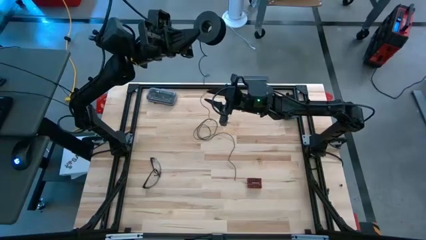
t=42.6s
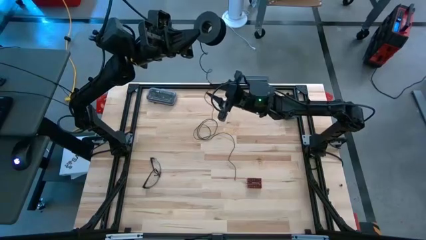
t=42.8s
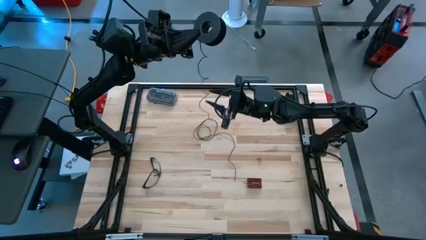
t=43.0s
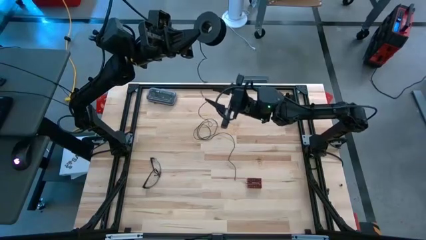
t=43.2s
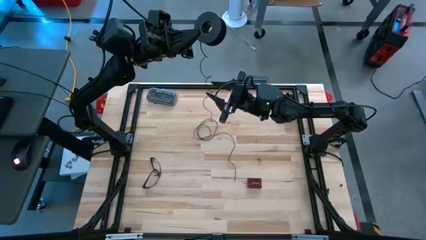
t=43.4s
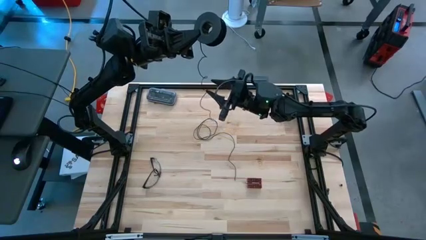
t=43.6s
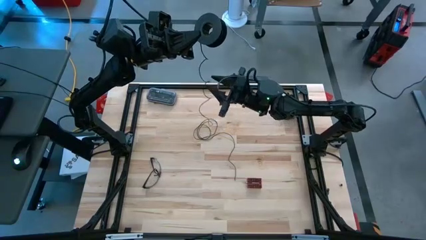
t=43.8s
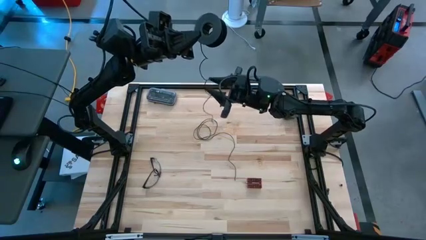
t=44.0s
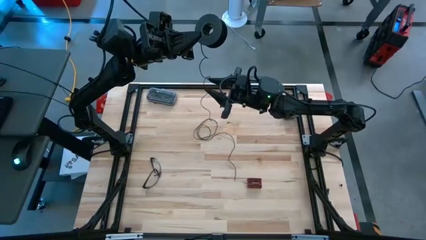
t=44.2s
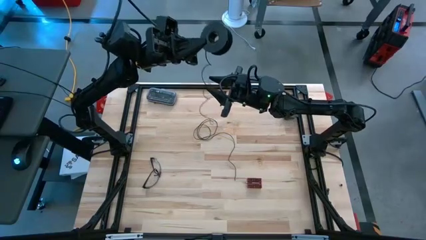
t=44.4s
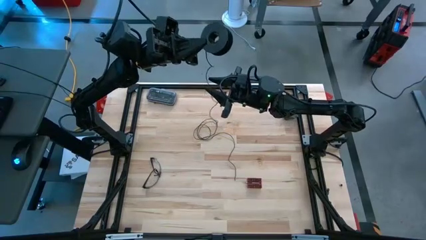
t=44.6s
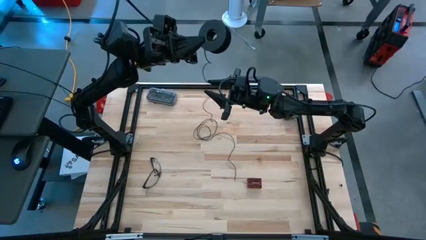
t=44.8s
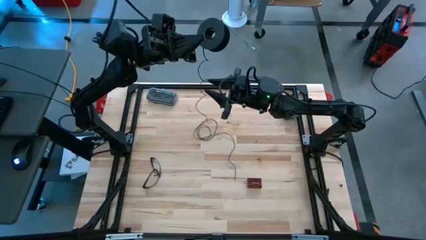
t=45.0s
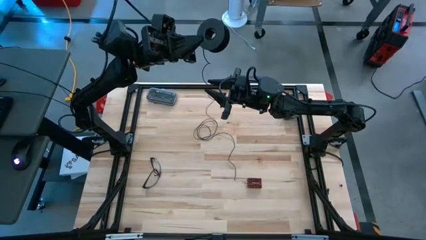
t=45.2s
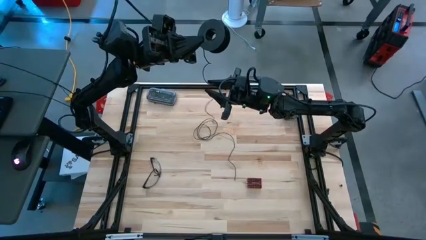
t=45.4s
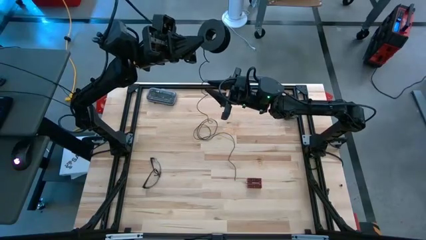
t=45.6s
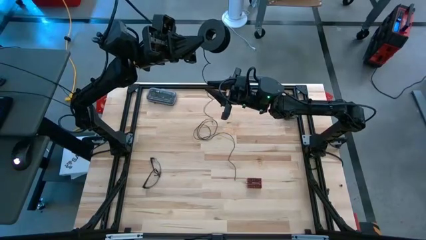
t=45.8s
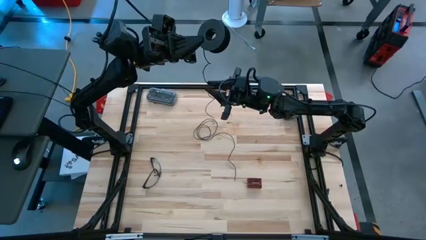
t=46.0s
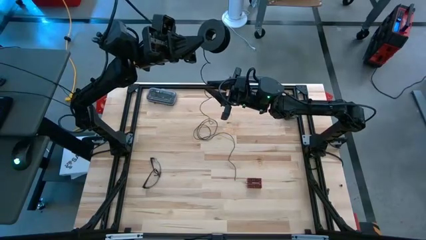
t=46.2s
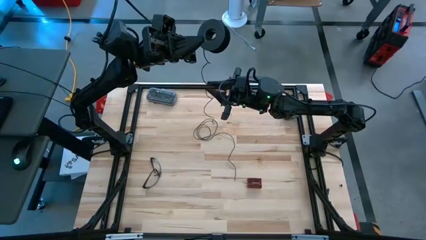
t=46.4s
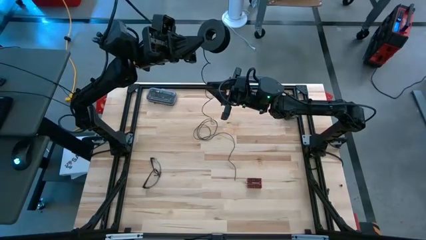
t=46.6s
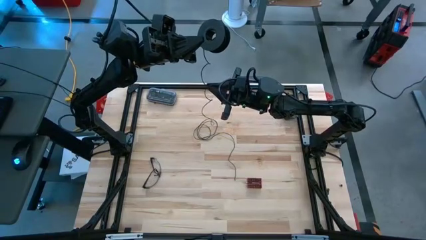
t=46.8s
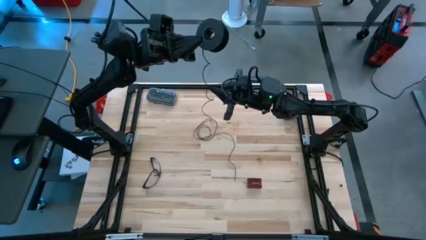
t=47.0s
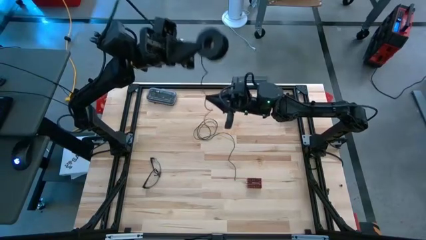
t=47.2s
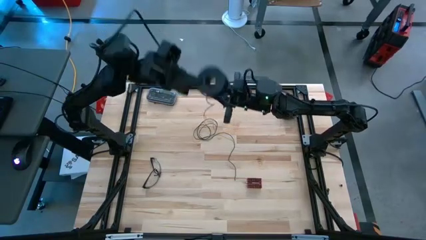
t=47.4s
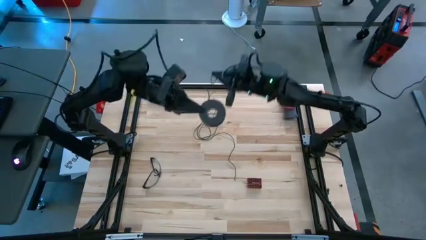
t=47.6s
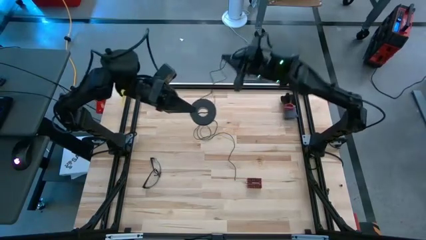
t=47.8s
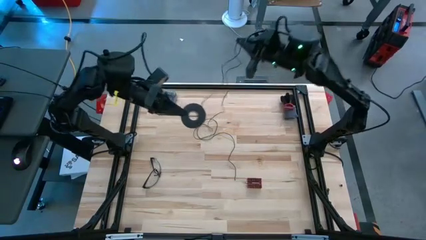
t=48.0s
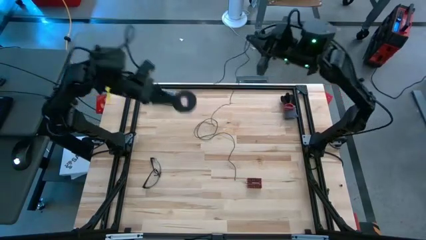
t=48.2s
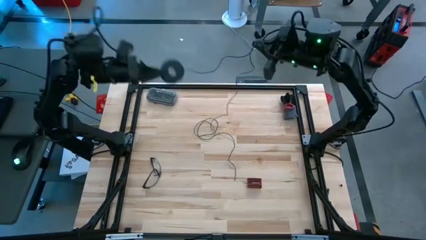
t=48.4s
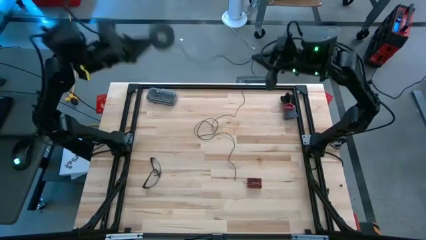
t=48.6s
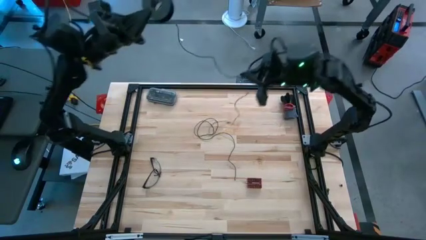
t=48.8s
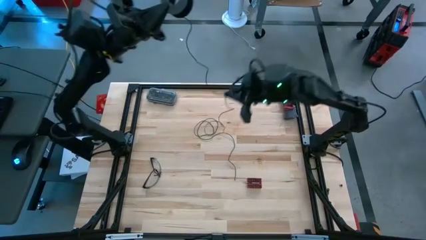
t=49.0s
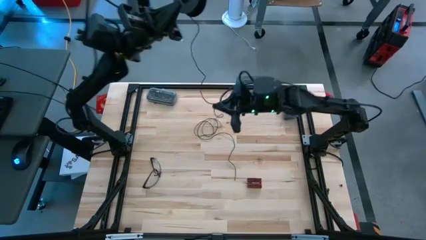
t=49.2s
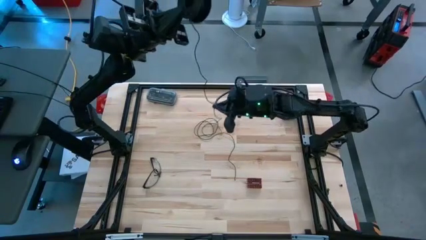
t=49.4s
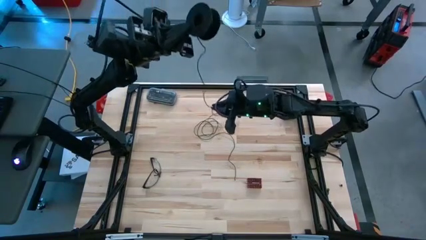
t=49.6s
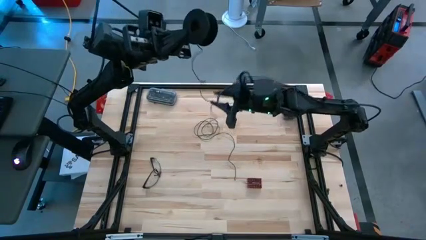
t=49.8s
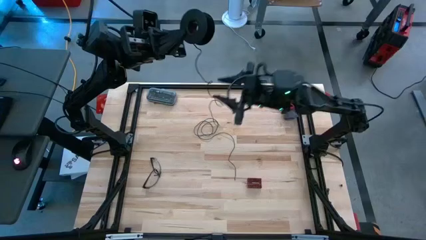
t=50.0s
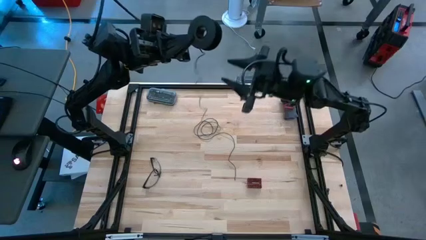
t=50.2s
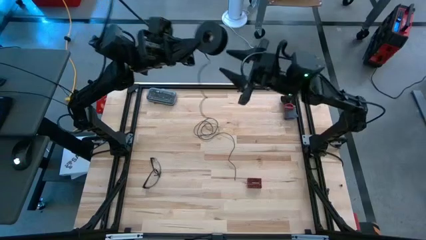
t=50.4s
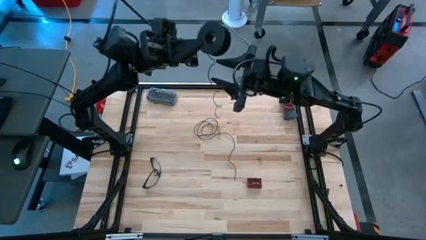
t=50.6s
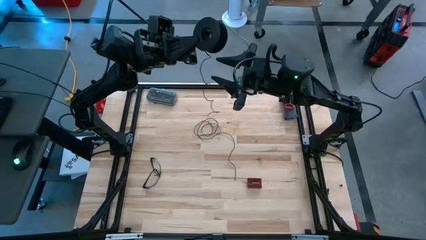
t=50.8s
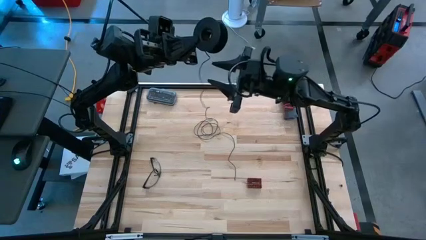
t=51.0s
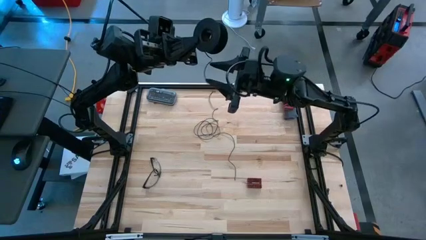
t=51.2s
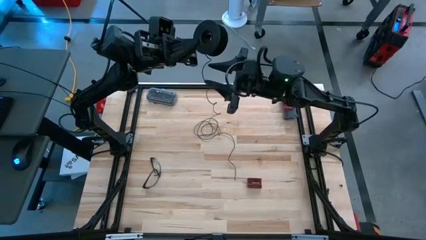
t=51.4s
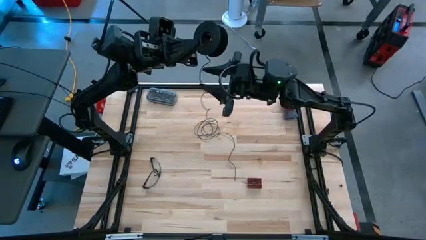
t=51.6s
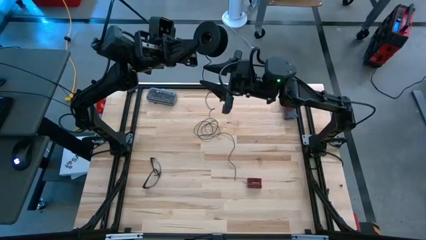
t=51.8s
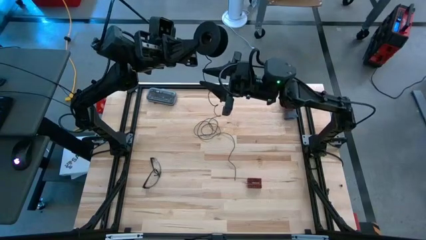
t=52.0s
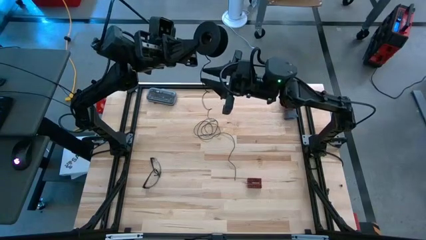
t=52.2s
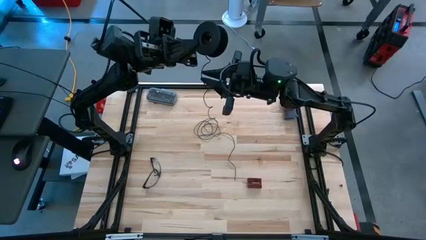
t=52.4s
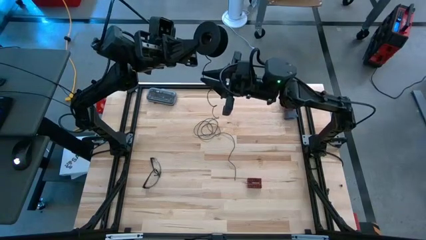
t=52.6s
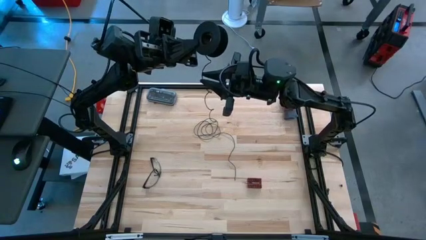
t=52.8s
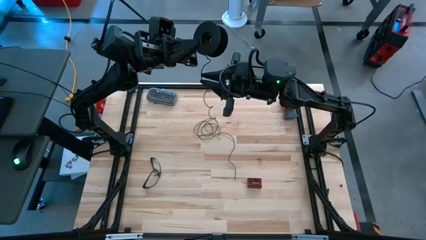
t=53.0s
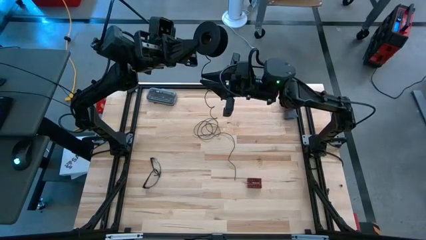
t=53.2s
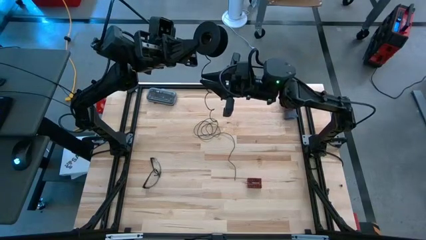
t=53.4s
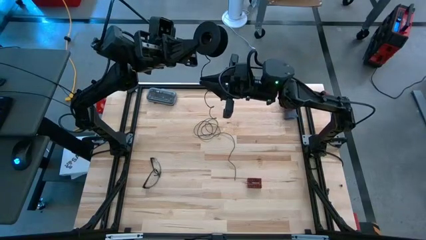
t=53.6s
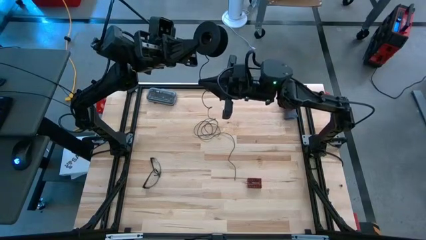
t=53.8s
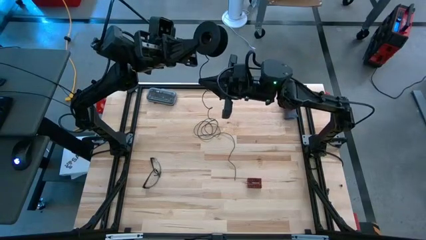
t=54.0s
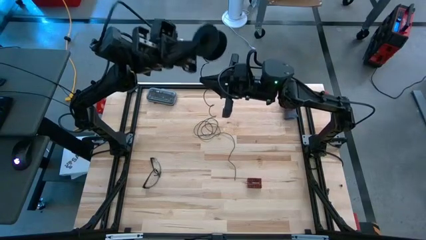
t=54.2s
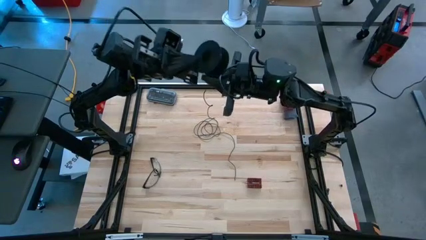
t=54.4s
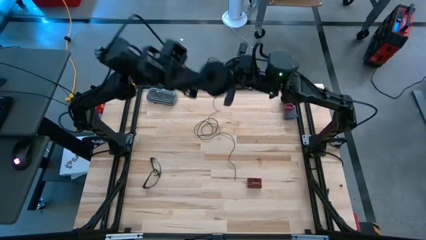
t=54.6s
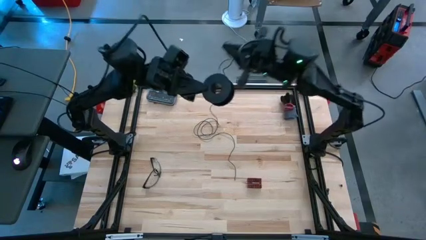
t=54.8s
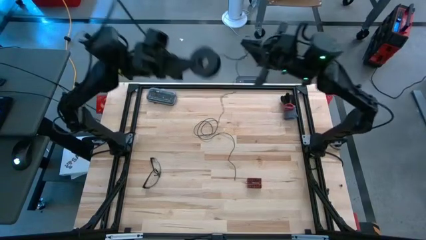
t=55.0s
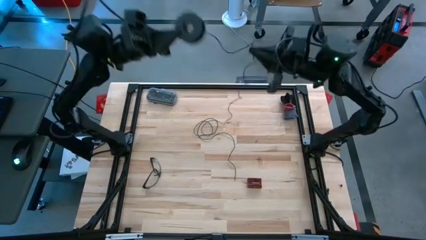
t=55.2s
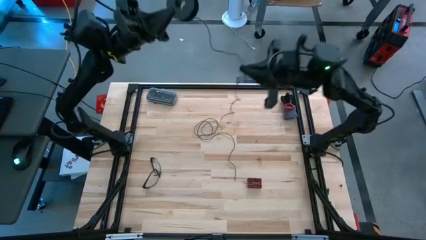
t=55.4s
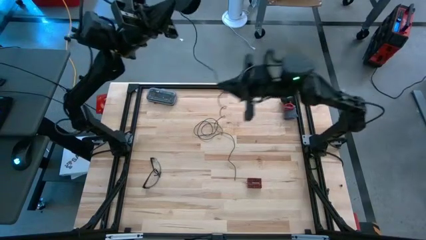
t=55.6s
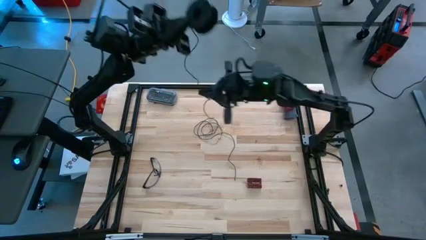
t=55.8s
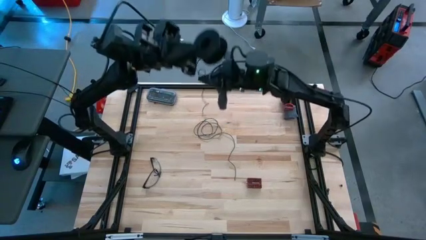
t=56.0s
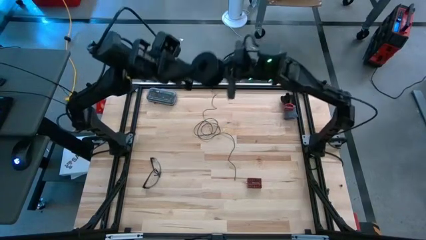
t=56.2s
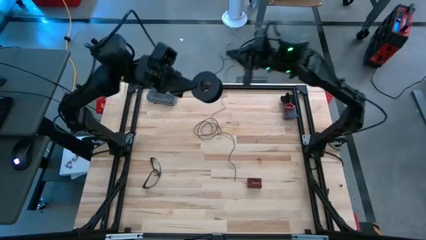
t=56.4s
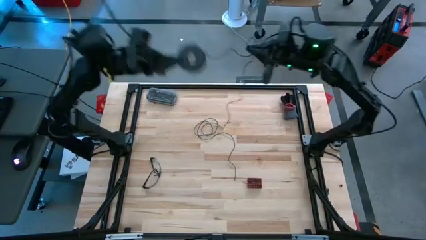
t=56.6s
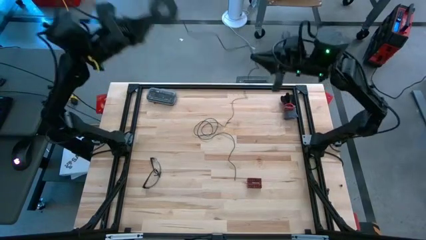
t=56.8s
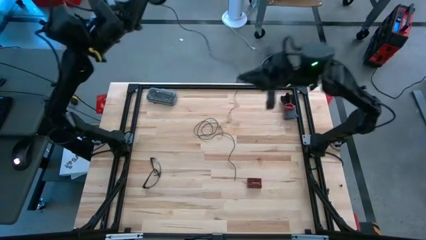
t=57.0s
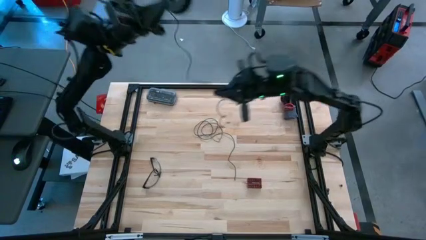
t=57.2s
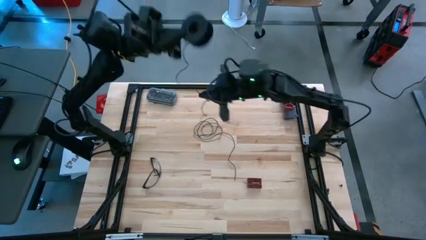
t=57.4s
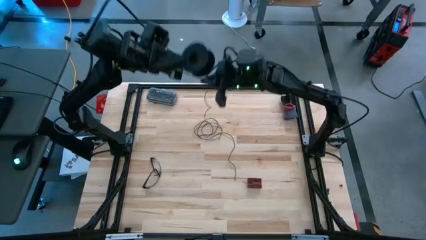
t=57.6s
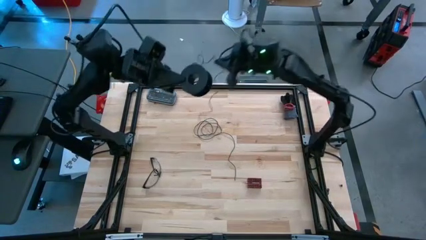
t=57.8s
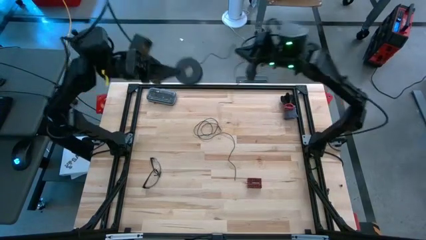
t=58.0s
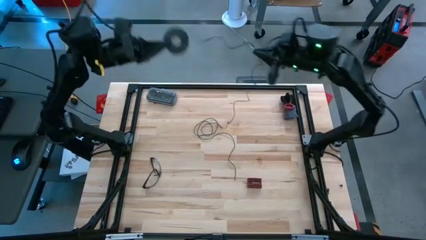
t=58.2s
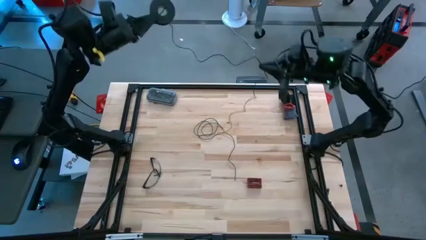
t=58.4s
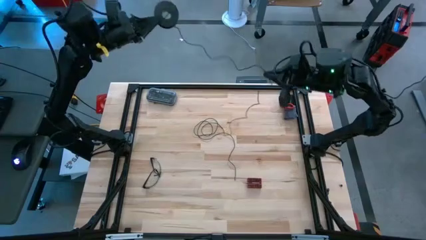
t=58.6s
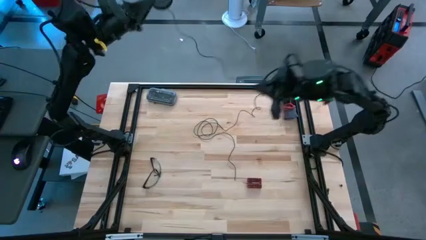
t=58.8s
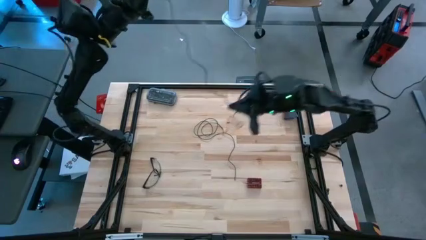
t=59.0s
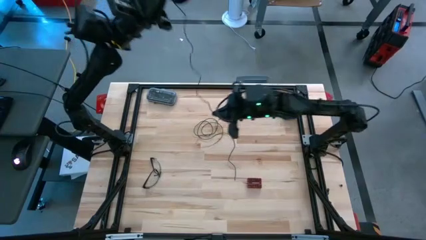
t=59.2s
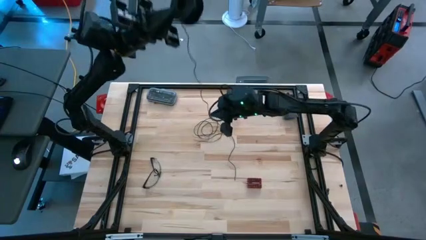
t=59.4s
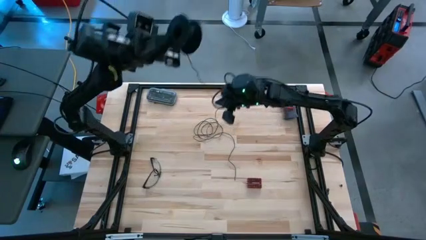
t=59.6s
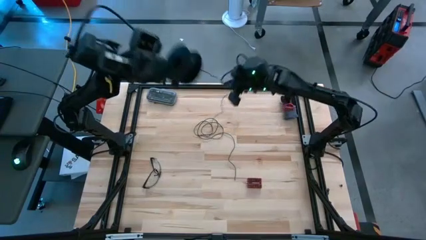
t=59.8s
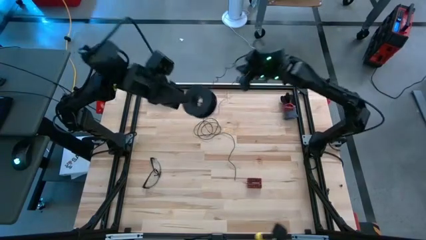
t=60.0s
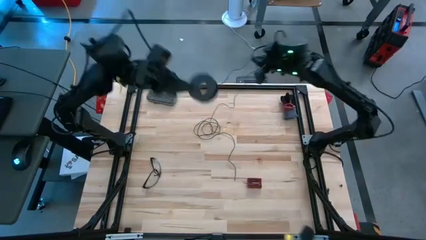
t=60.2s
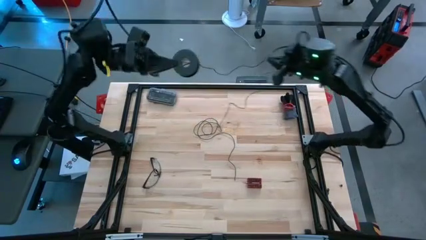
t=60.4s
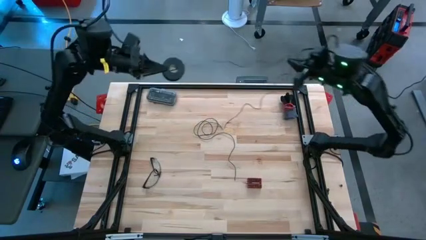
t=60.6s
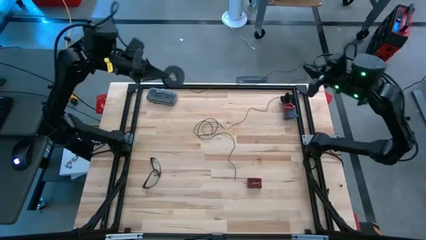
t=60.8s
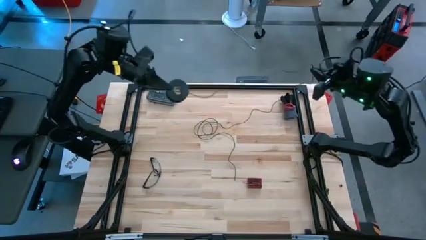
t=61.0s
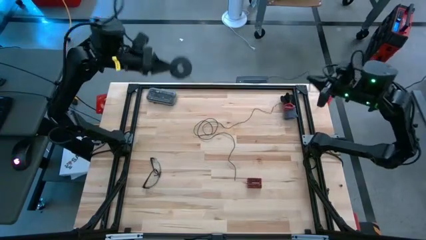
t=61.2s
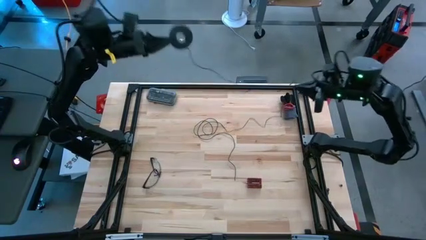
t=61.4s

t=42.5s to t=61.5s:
Task: Coil cords
Uncoil the black wire from the spool
